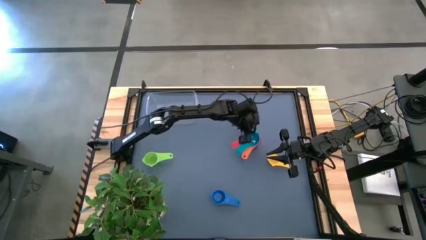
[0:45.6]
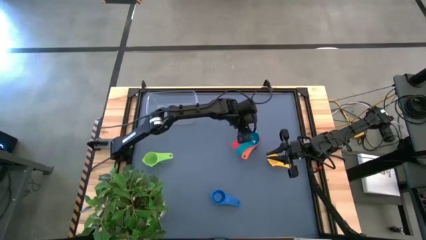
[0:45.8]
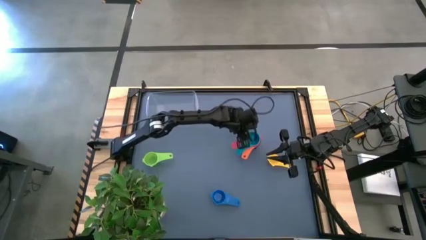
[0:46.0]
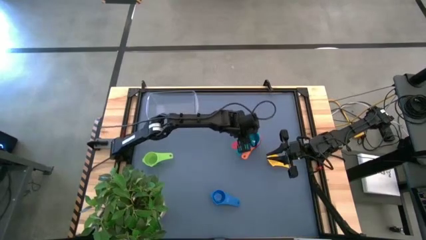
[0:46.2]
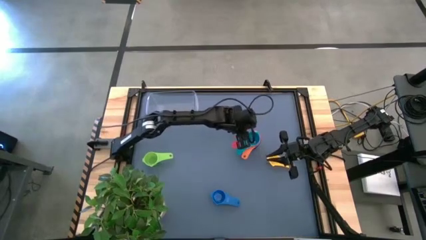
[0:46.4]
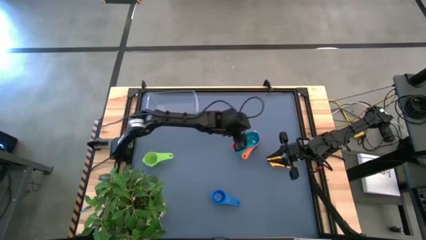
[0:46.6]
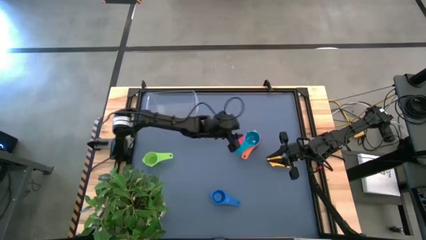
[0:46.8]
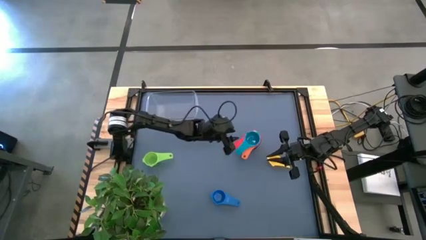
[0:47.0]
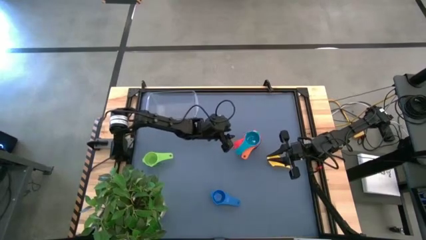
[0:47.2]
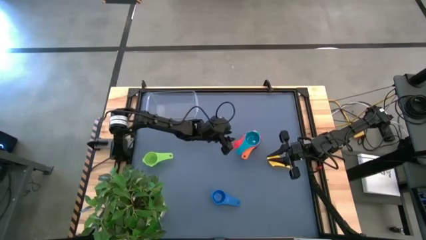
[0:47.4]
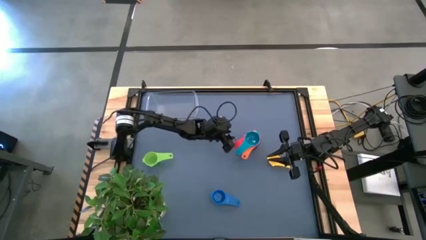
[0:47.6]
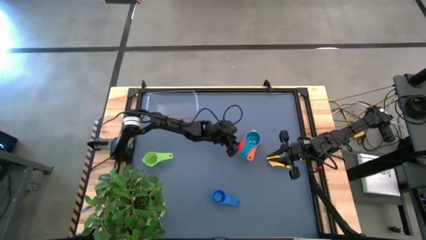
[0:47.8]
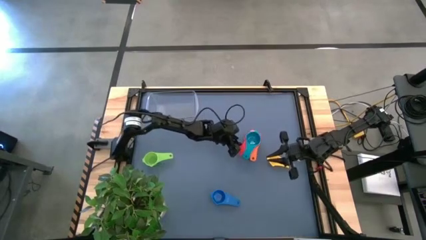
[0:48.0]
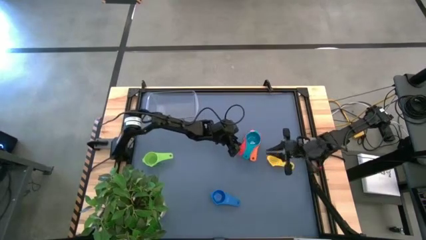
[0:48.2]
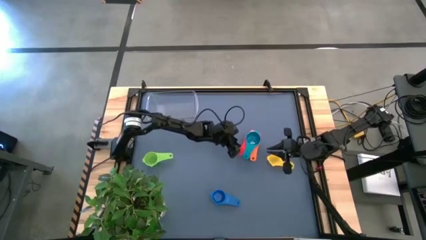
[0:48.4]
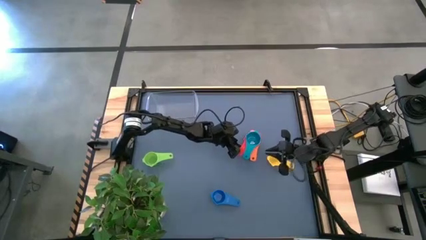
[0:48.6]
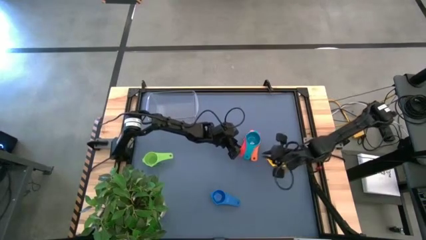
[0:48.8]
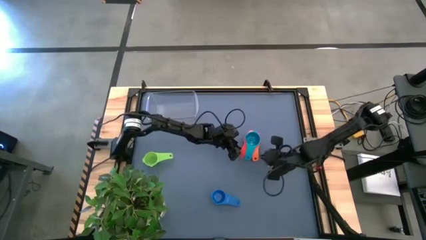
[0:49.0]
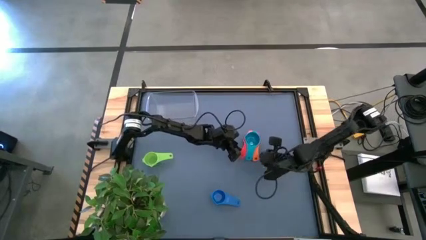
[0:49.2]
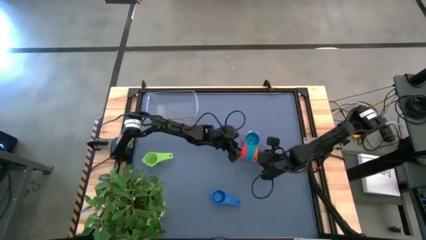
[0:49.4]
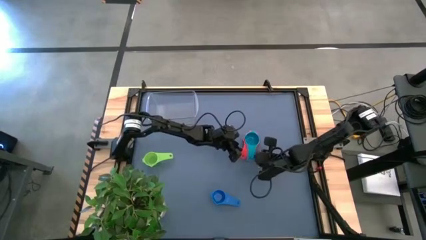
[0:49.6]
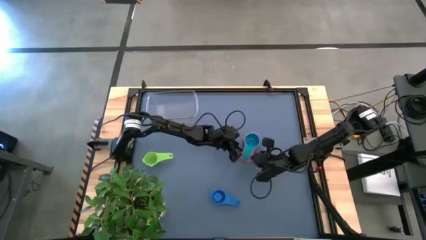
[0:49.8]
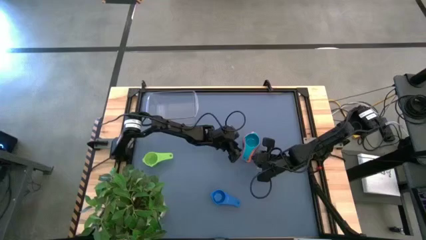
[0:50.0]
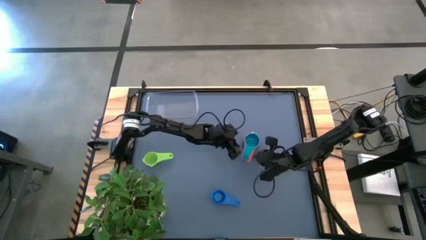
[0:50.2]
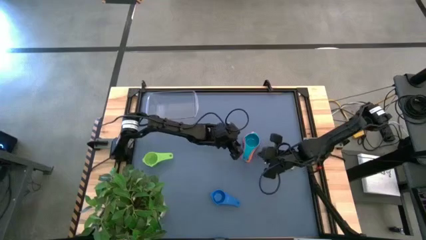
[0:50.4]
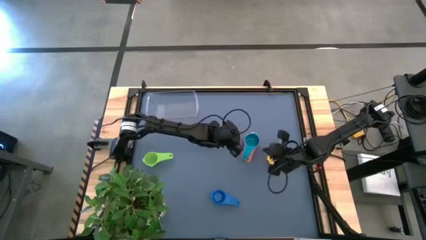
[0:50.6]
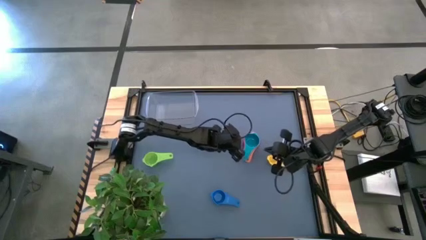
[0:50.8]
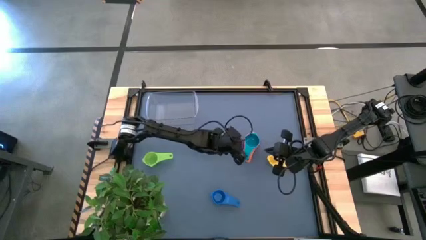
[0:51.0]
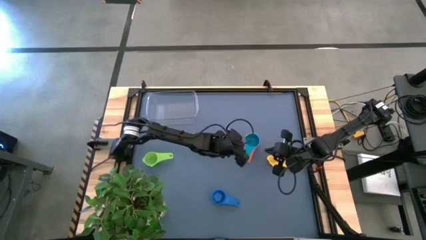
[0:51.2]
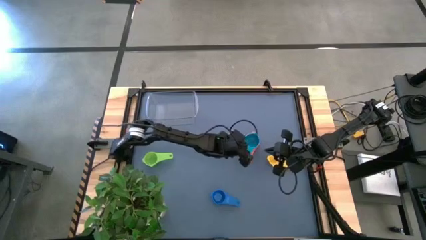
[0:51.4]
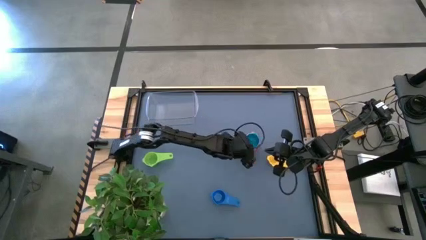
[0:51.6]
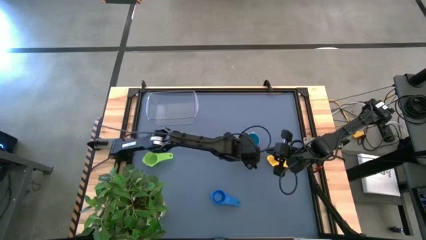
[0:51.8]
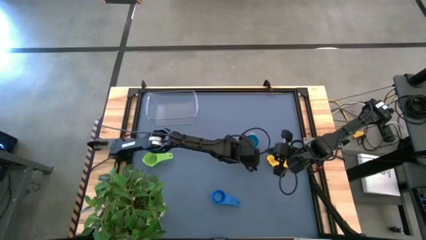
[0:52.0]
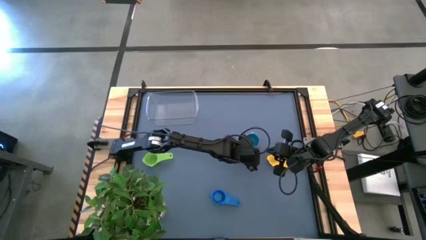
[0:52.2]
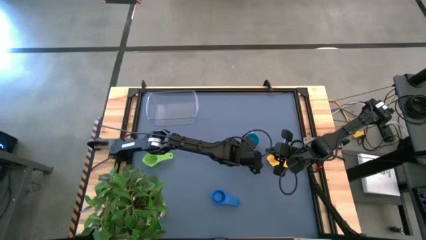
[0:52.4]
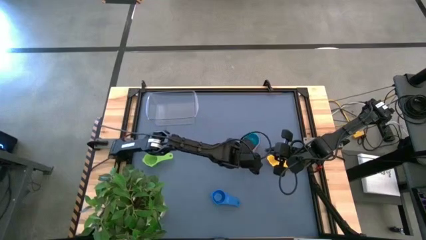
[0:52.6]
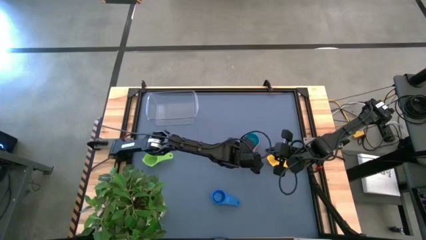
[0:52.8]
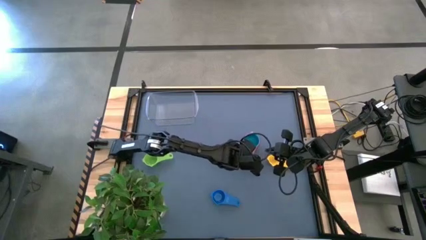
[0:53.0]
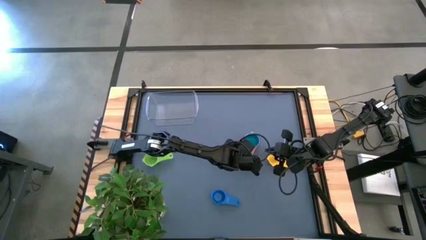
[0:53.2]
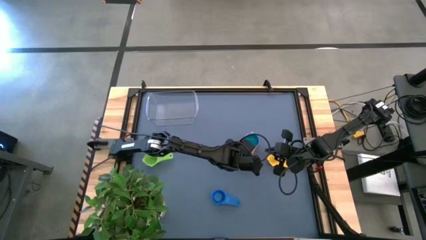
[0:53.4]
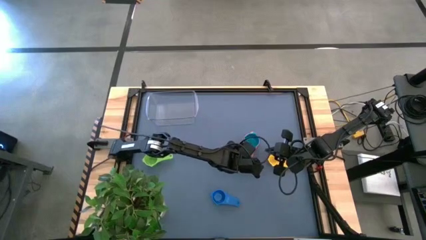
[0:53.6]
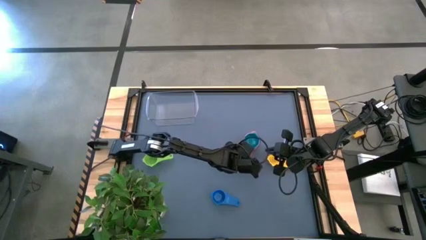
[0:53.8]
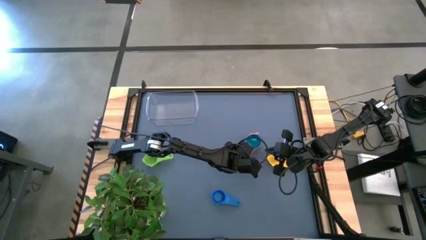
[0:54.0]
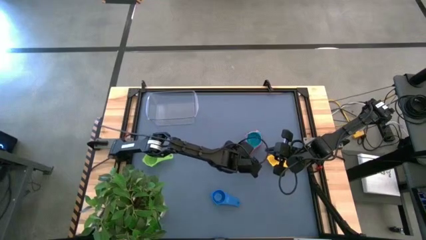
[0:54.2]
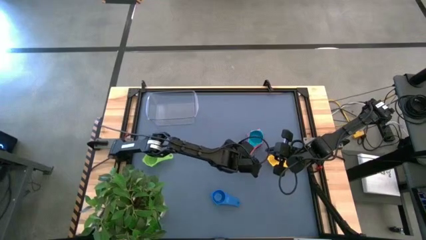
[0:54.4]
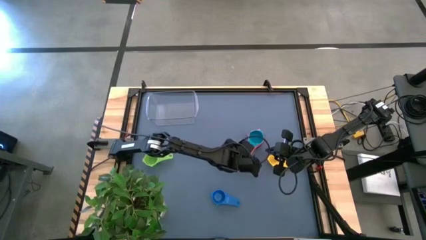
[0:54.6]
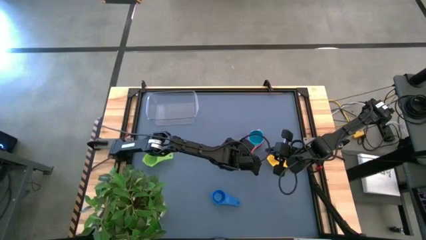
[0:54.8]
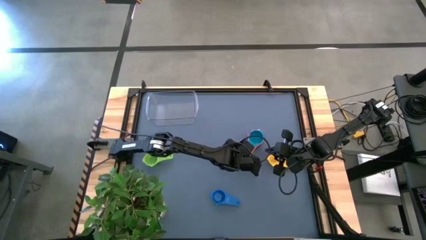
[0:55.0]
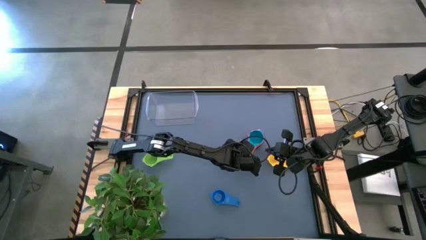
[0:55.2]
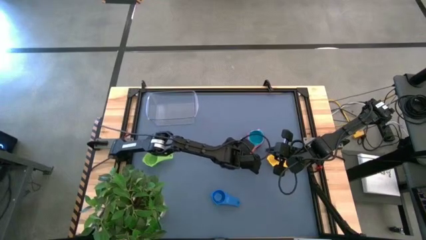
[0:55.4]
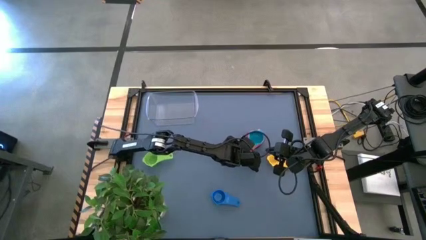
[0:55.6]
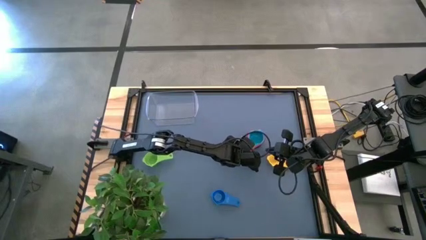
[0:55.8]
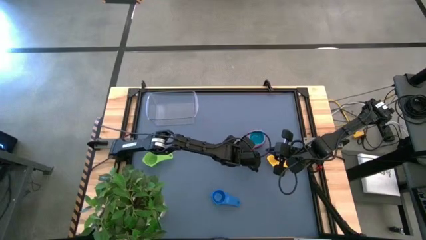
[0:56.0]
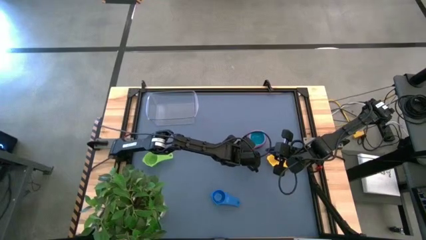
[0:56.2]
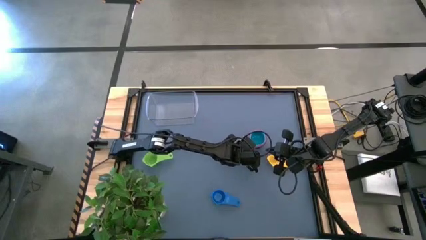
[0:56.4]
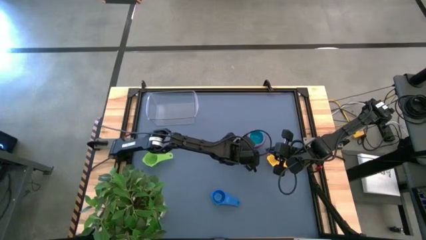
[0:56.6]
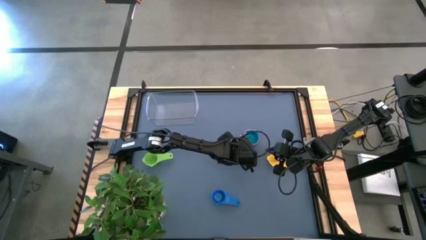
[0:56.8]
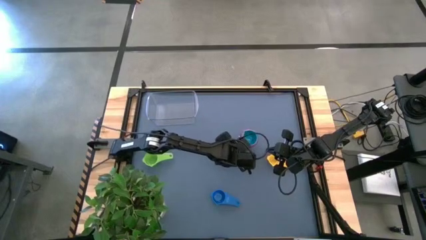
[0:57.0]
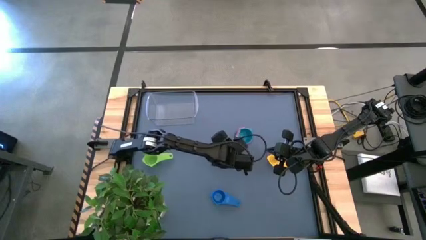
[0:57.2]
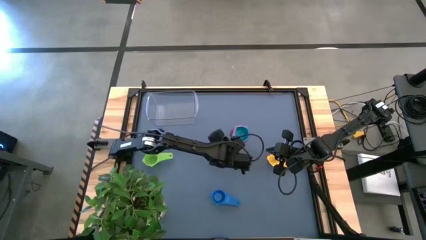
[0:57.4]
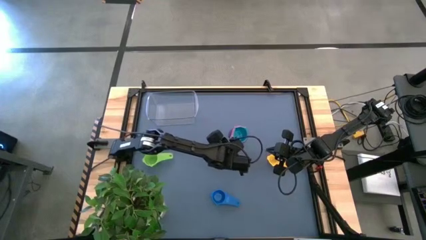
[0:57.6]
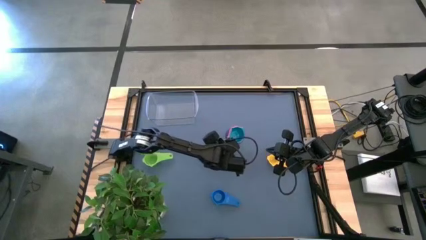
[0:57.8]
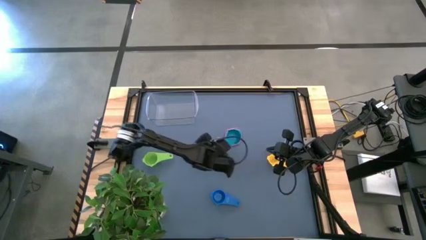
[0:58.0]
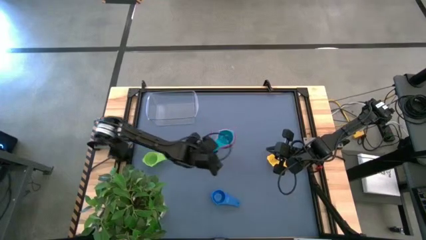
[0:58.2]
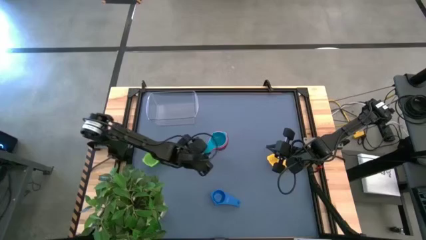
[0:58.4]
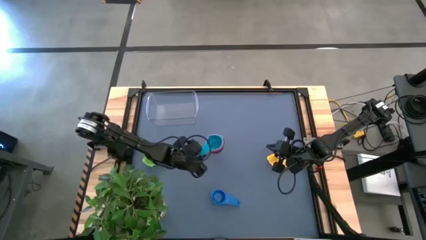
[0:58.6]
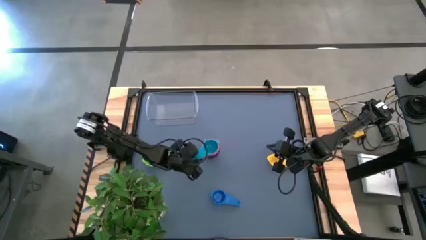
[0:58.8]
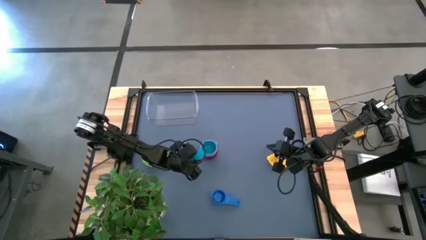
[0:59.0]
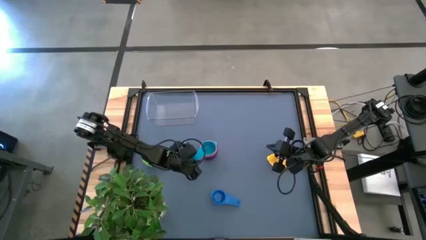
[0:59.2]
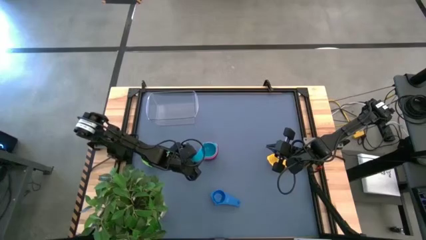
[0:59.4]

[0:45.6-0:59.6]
Task: Nest measuring cups in basket
Move the nested measuring cups to the center of the table
